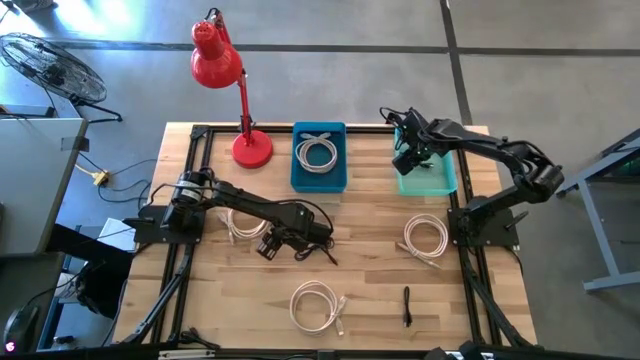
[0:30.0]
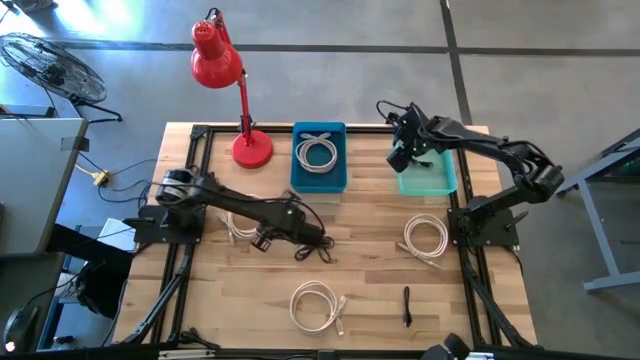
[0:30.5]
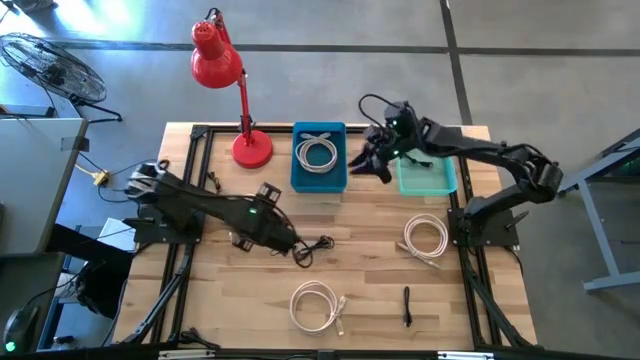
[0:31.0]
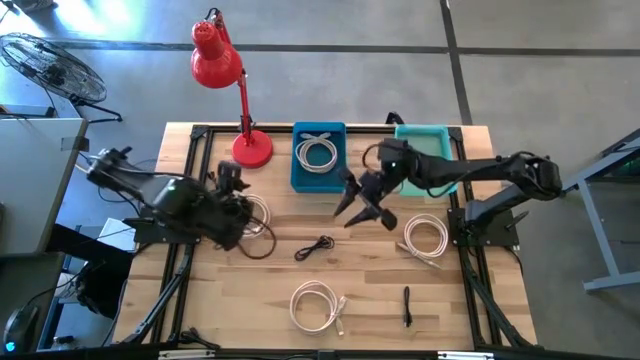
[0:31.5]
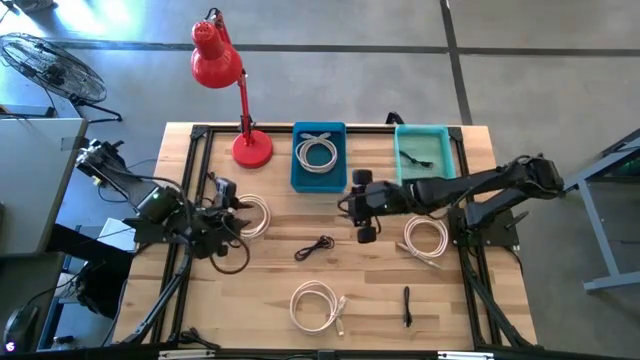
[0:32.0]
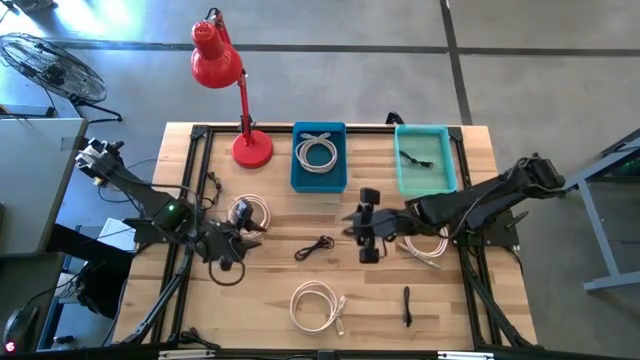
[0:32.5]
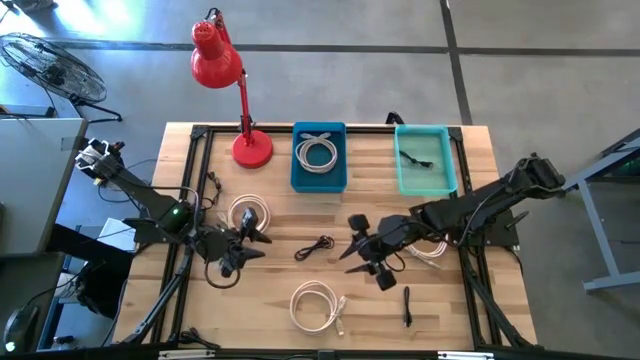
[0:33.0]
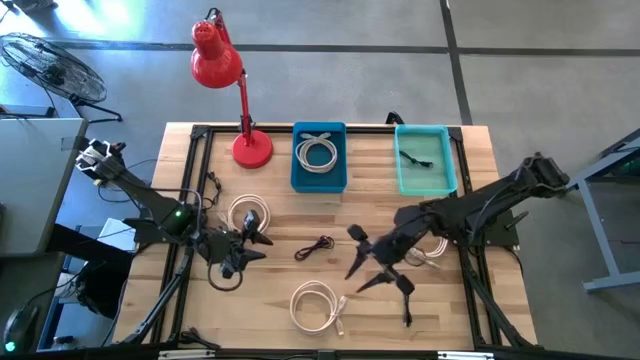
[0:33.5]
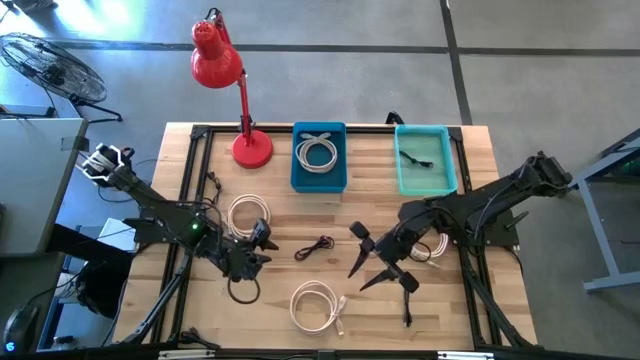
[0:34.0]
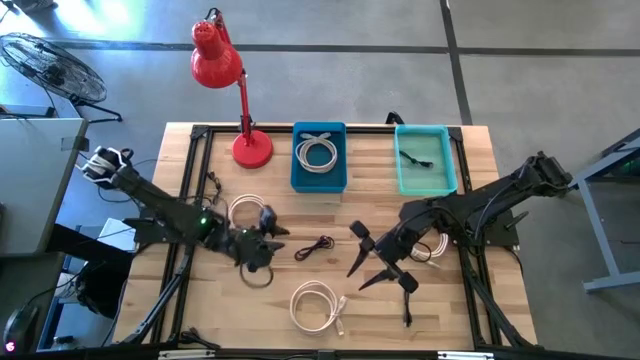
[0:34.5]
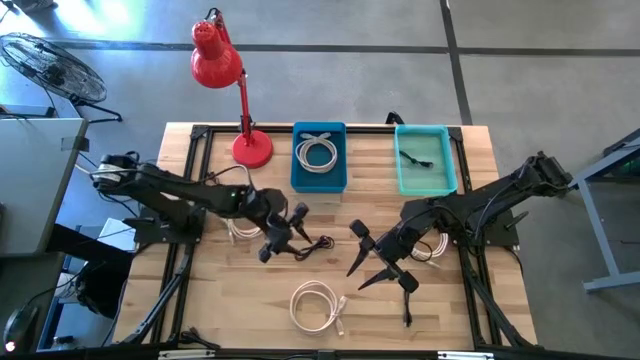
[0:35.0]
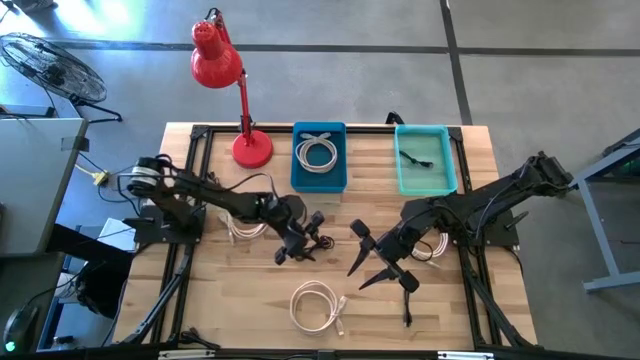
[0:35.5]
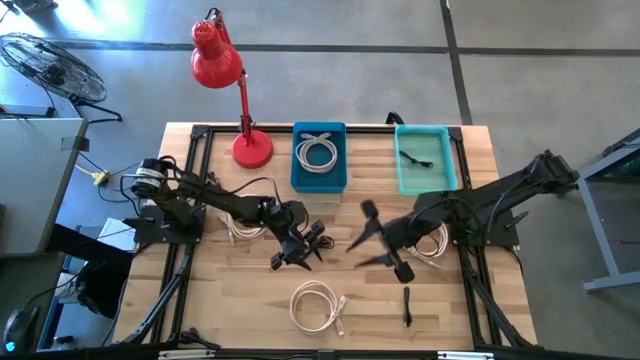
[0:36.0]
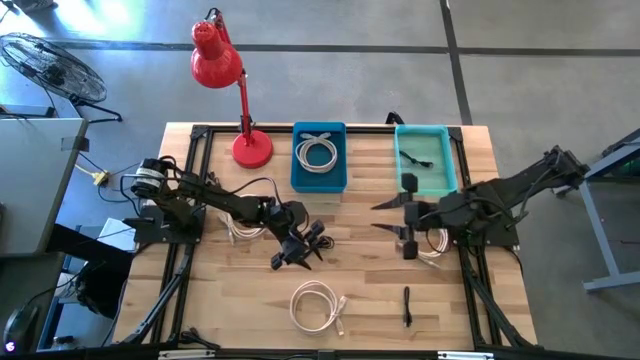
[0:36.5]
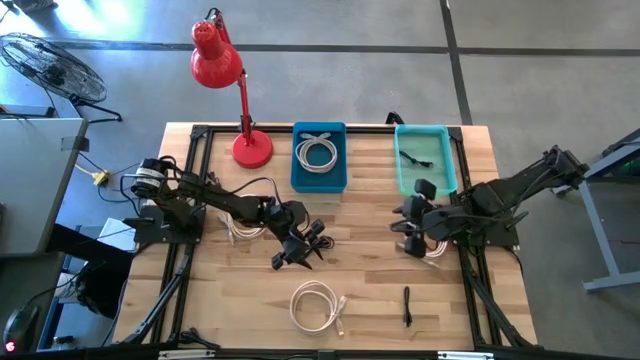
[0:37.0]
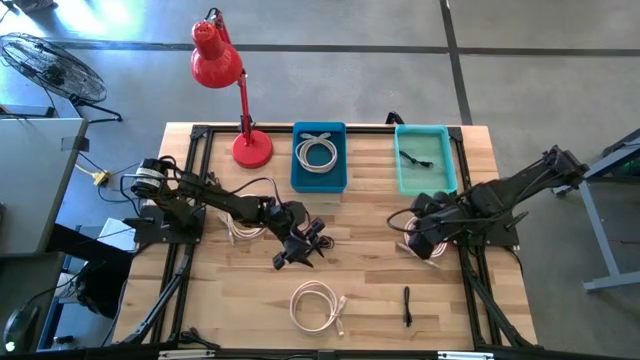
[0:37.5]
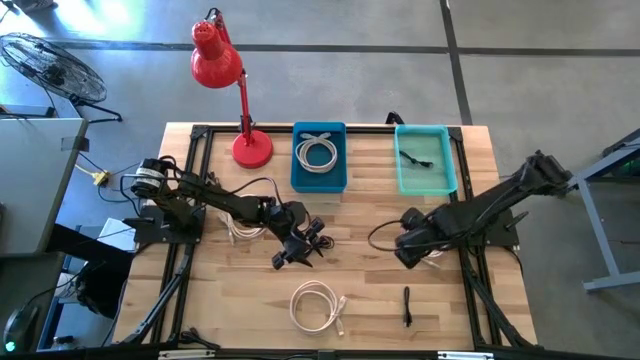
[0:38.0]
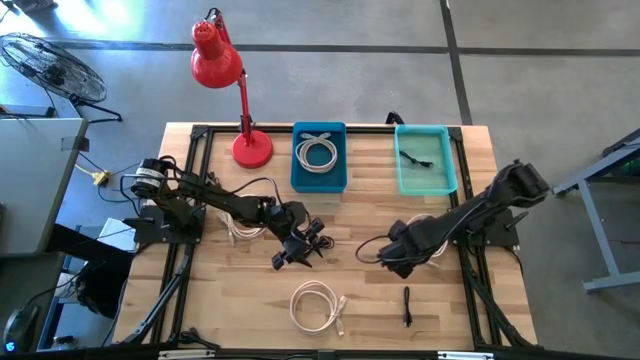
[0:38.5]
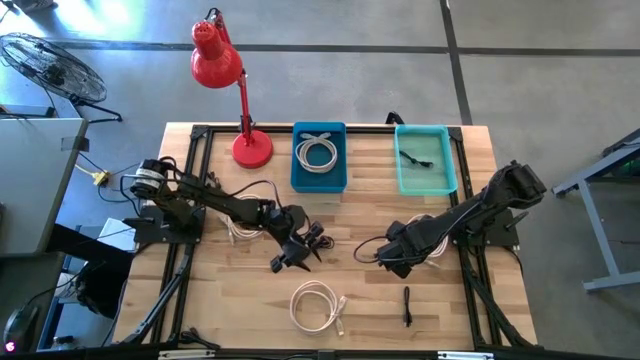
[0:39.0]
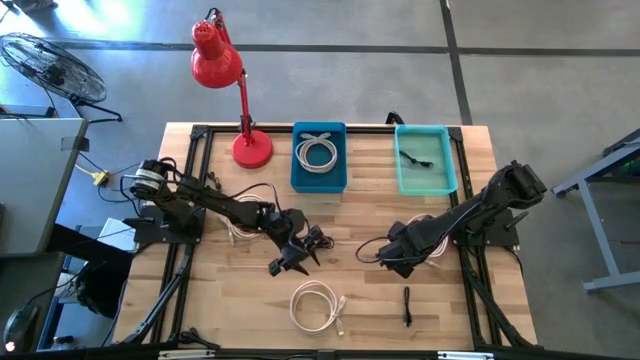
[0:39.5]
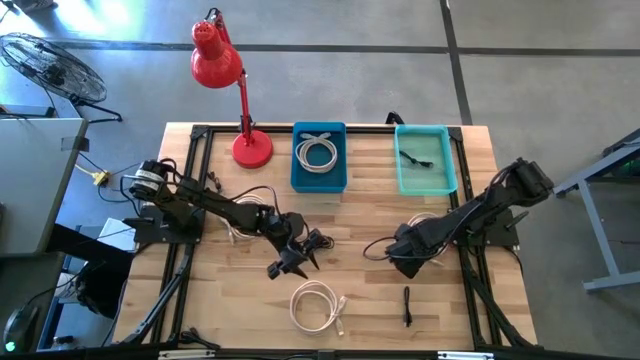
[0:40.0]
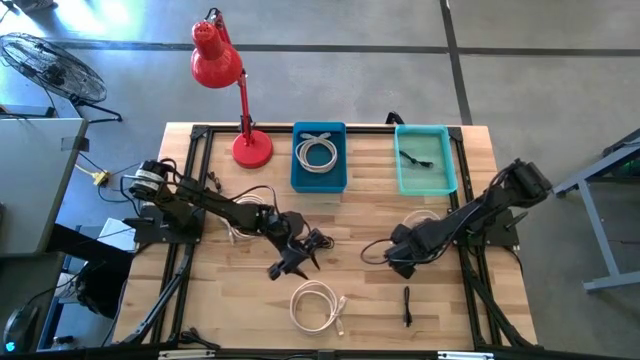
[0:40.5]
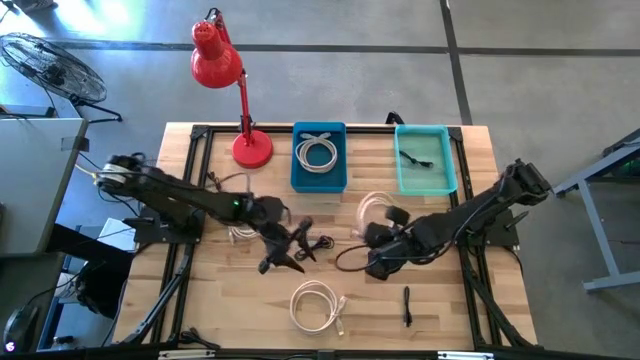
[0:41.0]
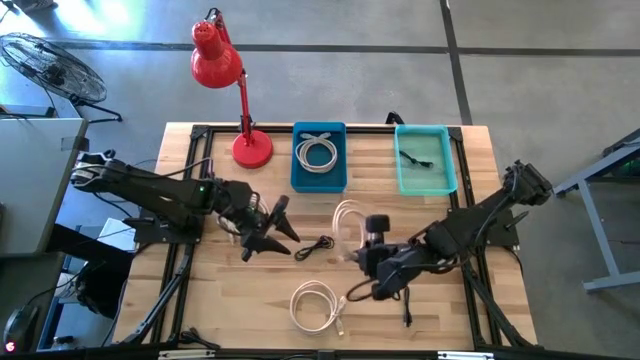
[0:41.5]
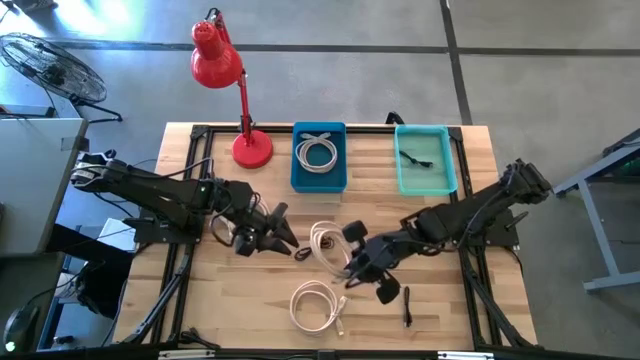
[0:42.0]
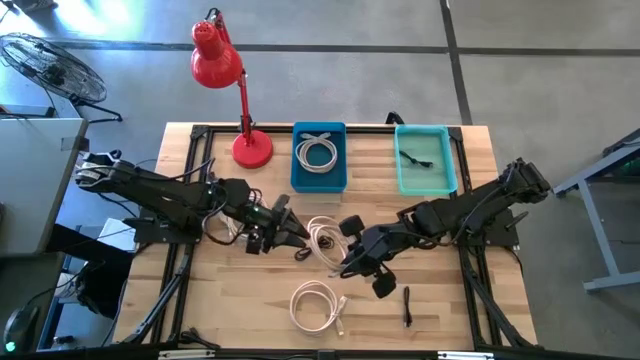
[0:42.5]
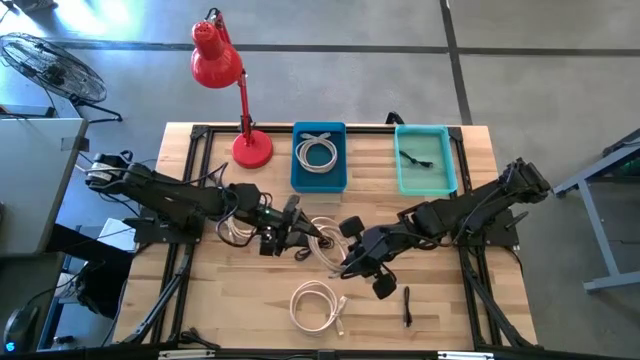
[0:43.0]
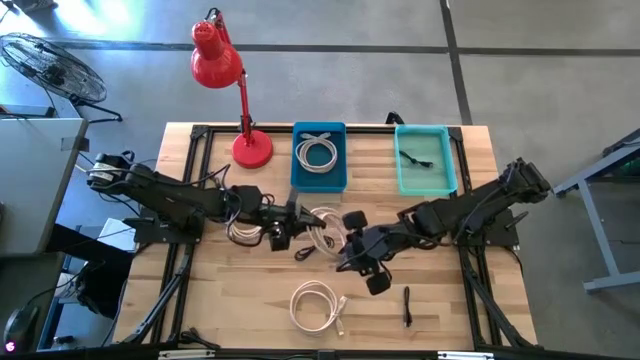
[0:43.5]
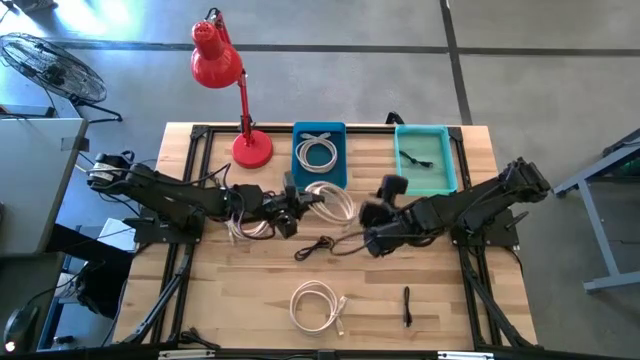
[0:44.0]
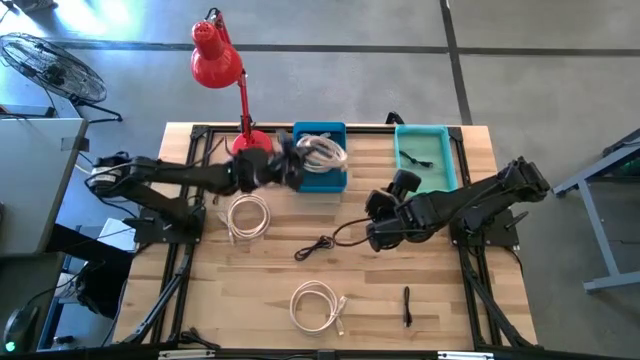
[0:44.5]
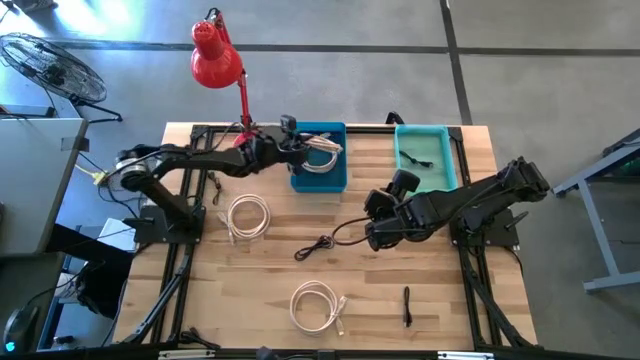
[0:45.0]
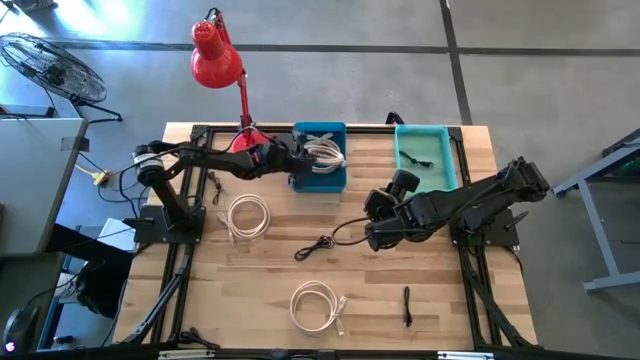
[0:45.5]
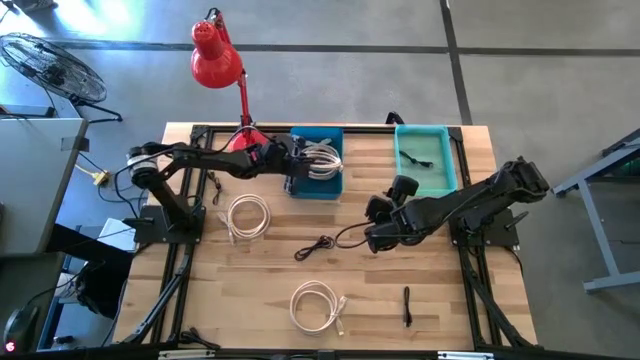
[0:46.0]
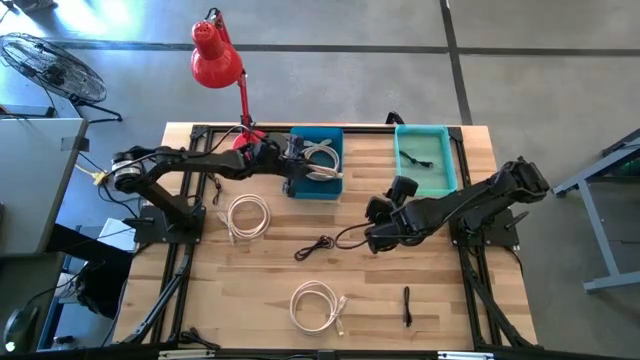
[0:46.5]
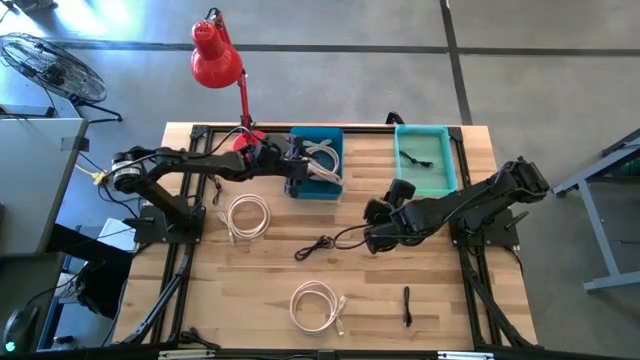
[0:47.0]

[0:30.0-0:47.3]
Task: Pick & Place USB Port
Put the brown HDMI cable in the green bin

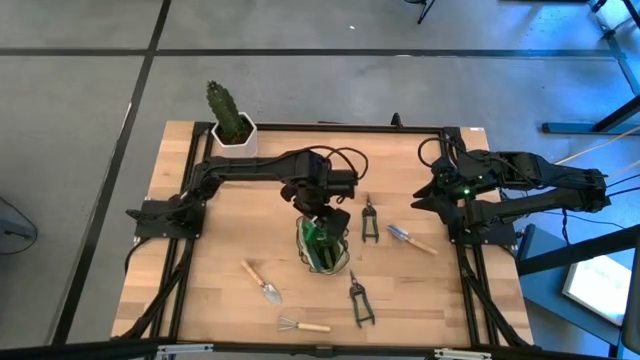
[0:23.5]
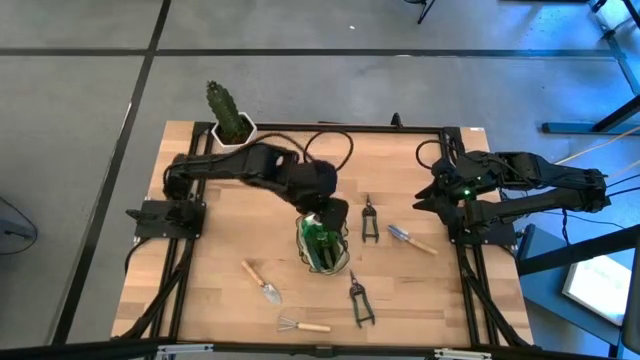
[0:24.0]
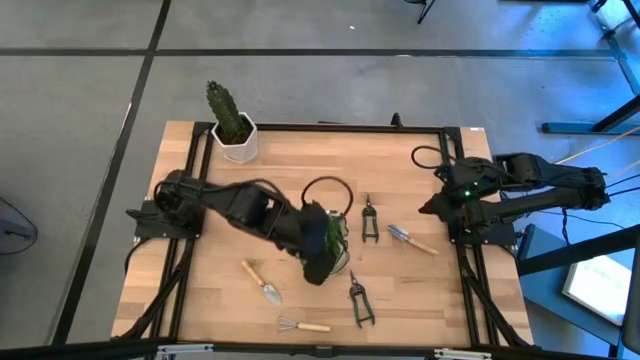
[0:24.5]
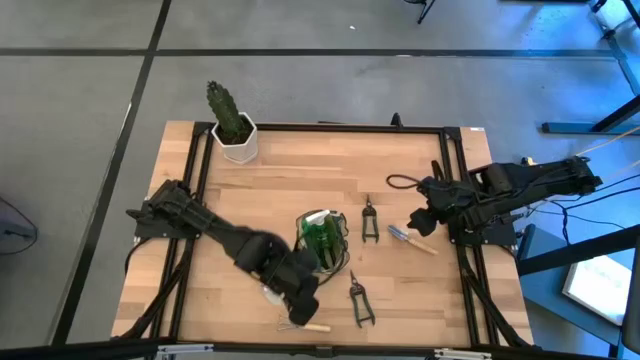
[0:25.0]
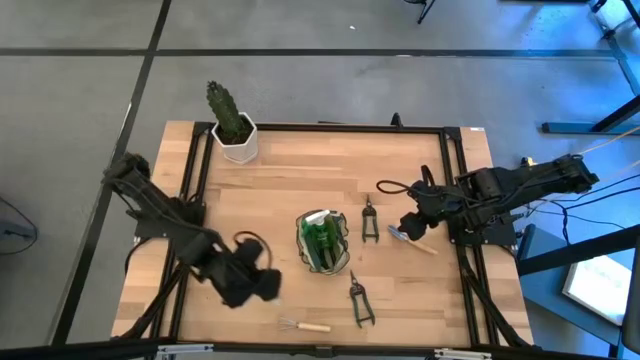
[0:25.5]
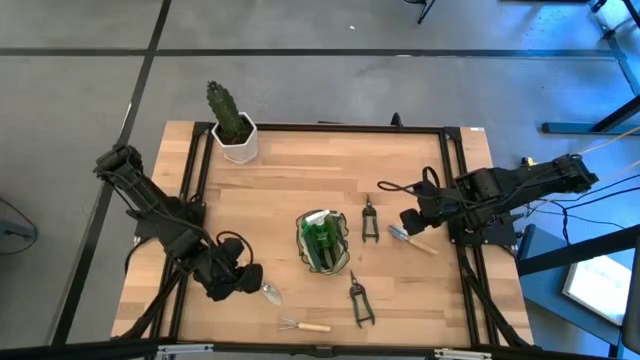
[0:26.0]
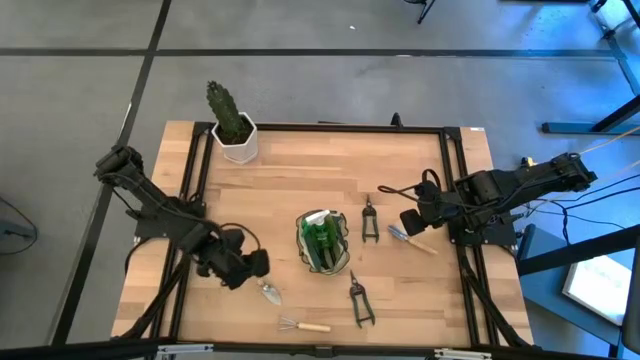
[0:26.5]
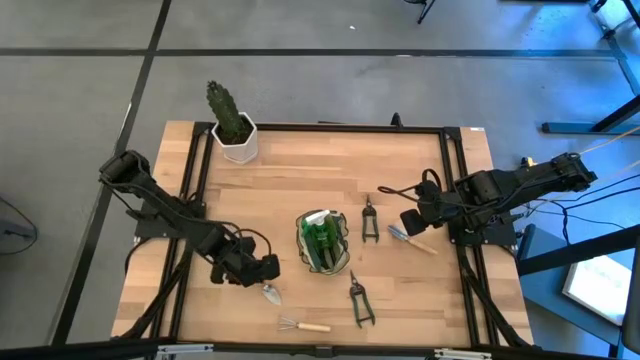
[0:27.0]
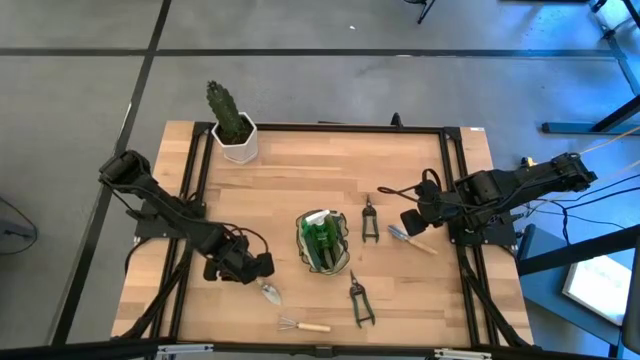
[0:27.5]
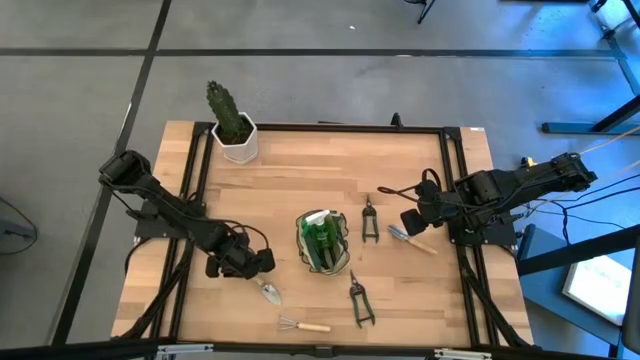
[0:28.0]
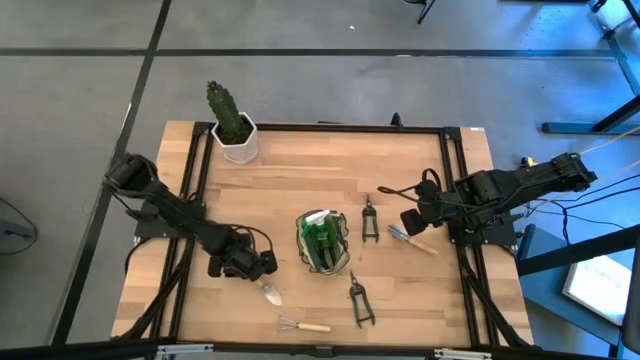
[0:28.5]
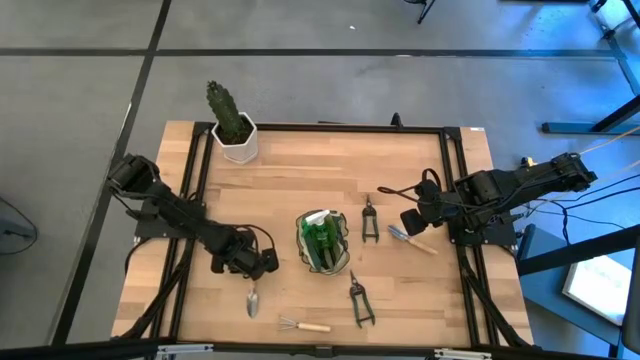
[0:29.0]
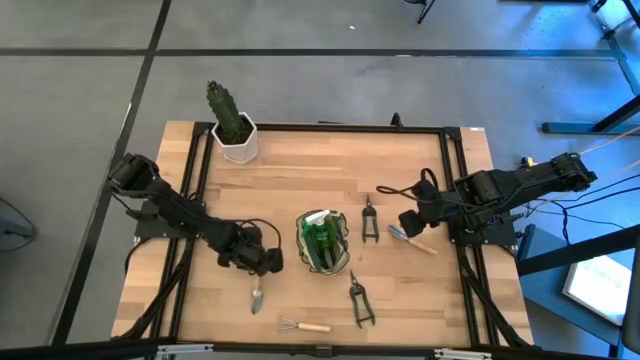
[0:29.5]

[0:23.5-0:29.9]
Task: Pick & Place Garden tools in Gardening bag
Put the left trowel into the gardening bag
